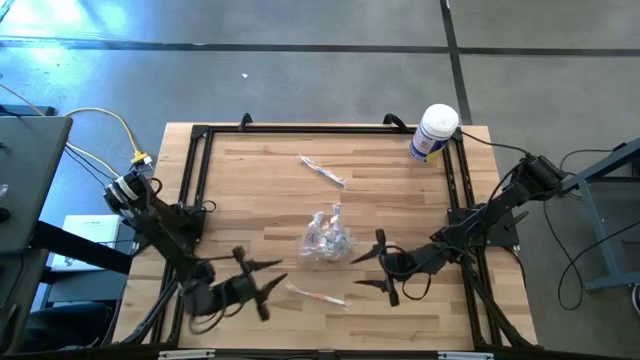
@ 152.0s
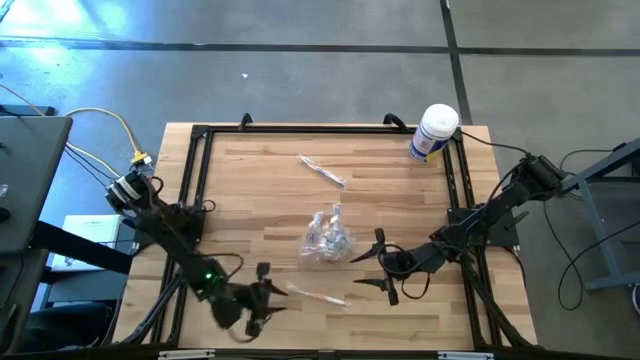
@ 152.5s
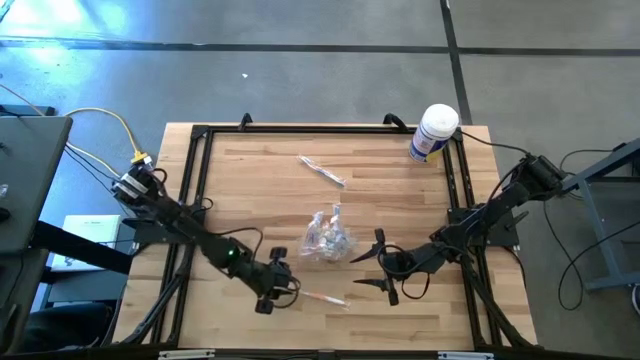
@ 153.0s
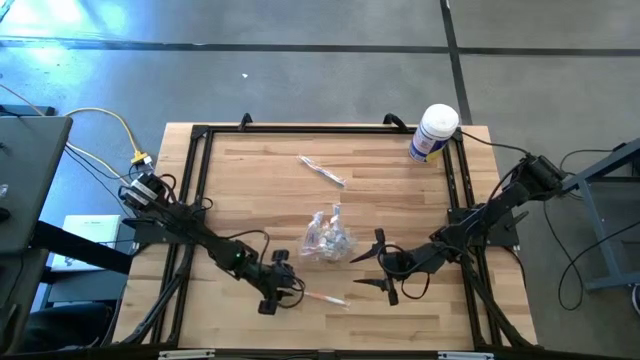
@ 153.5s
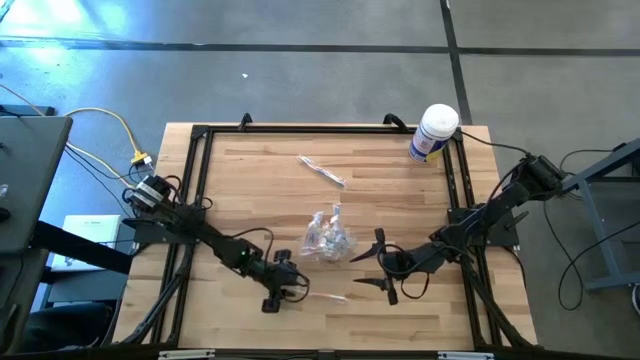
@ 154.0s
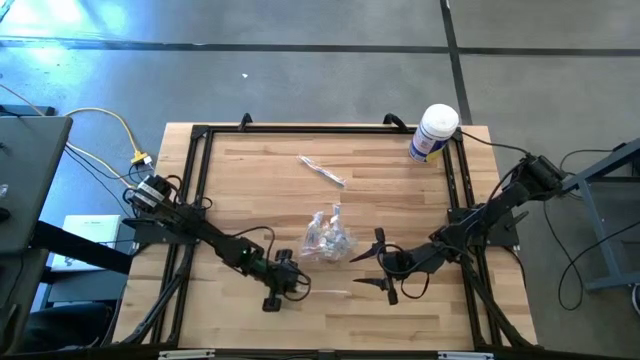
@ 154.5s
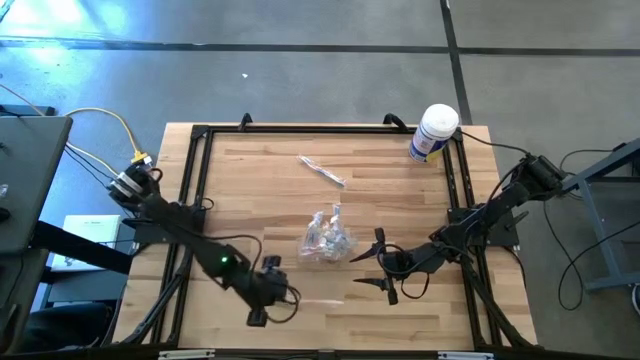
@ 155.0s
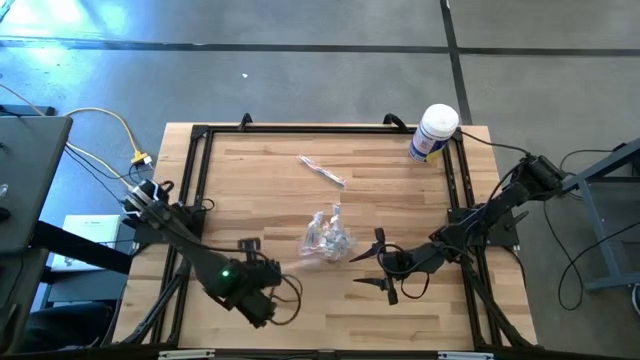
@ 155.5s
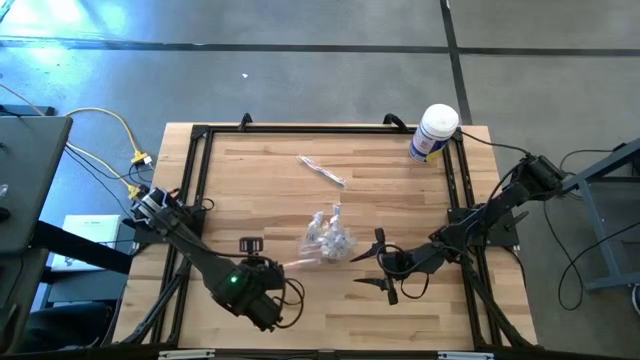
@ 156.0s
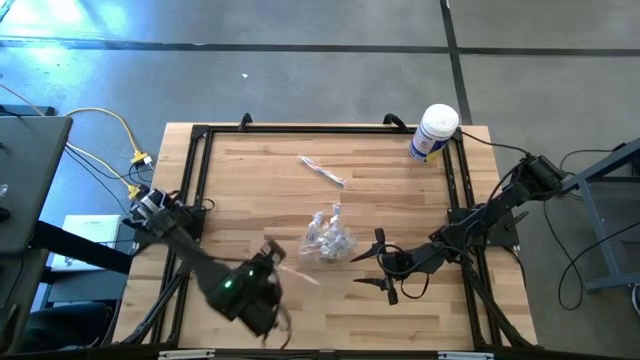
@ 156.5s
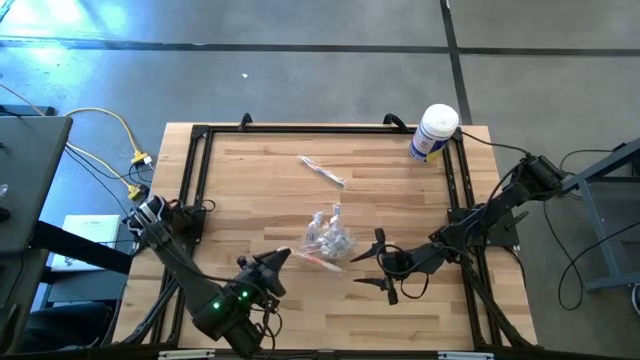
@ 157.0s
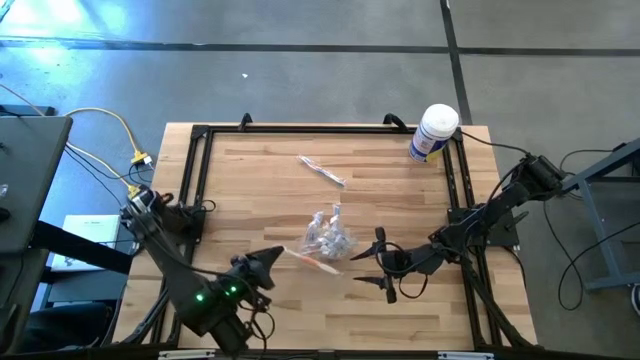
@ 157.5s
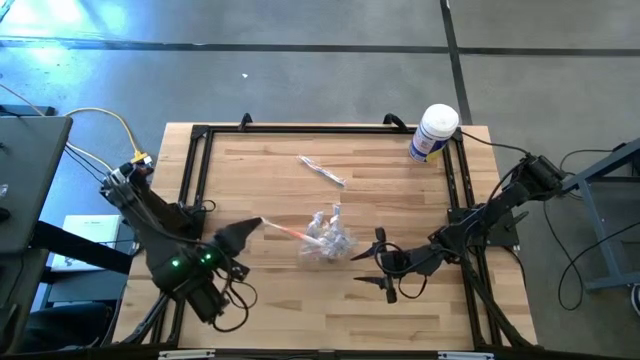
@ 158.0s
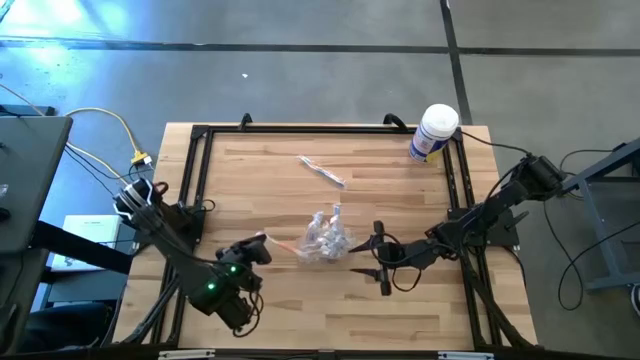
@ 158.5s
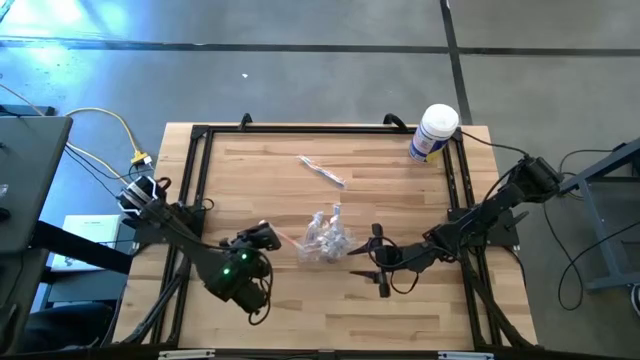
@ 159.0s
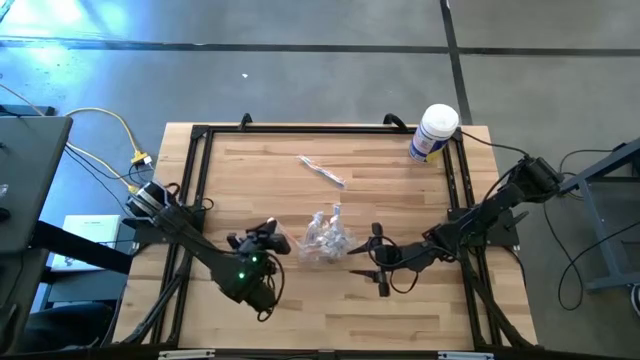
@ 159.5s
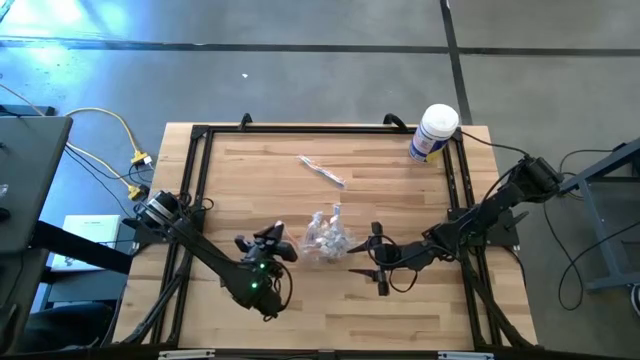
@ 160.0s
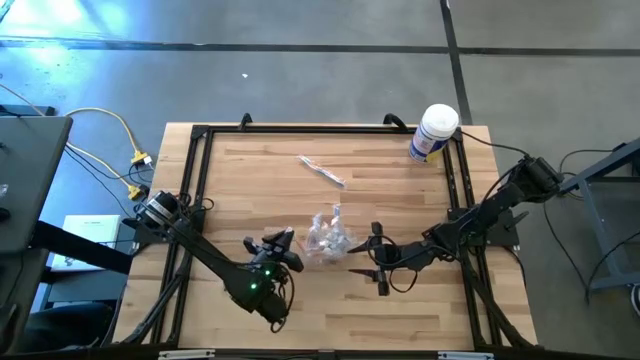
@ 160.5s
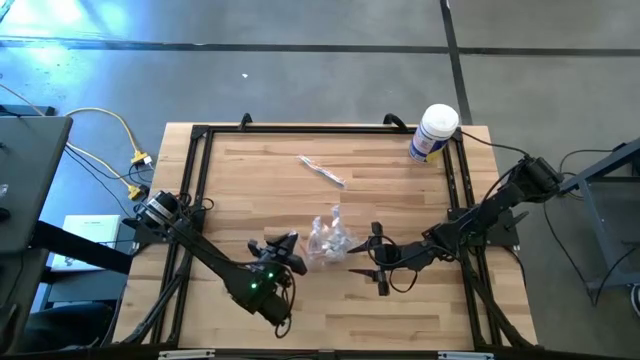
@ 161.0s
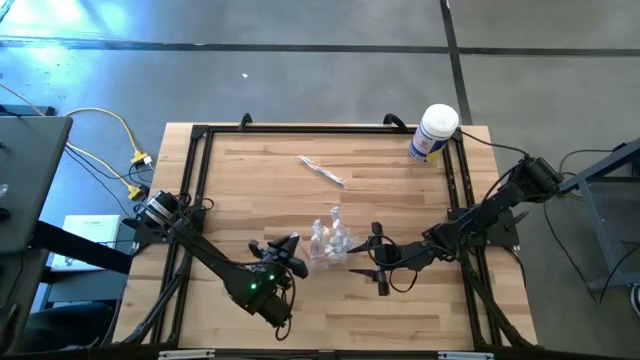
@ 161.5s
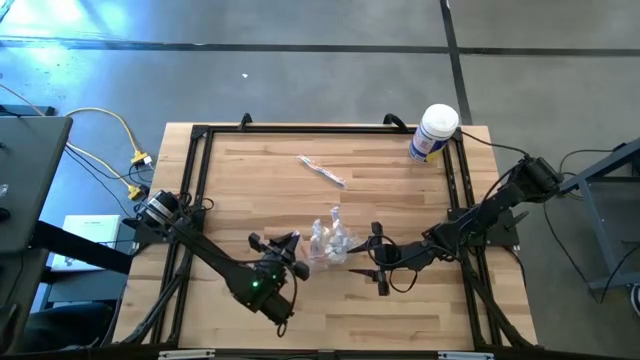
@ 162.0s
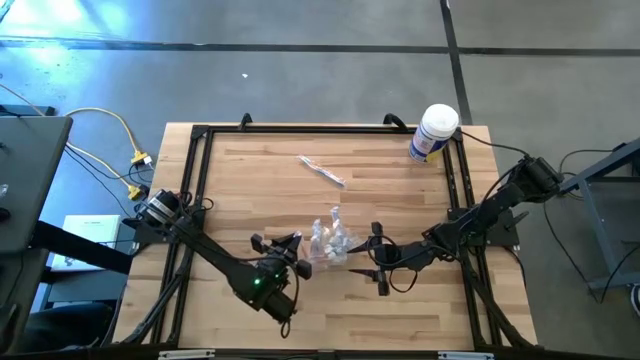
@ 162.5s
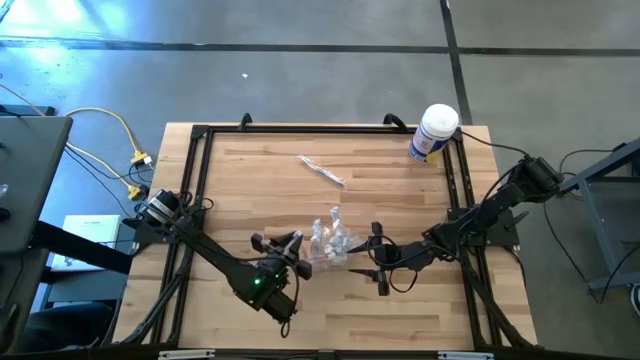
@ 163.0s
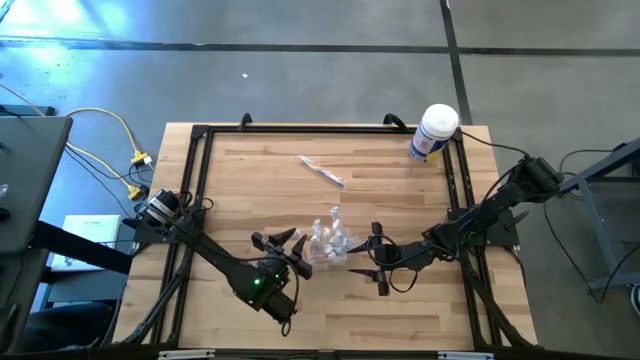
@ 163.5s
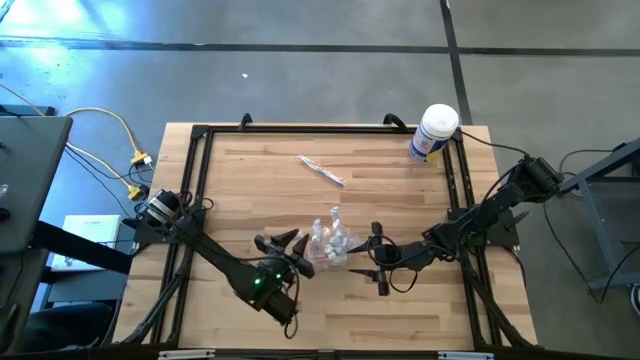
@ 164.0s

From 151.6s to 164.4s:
Task: Pick & Place toothbrushing station
Put the orange toothbrush into the transparent organizer

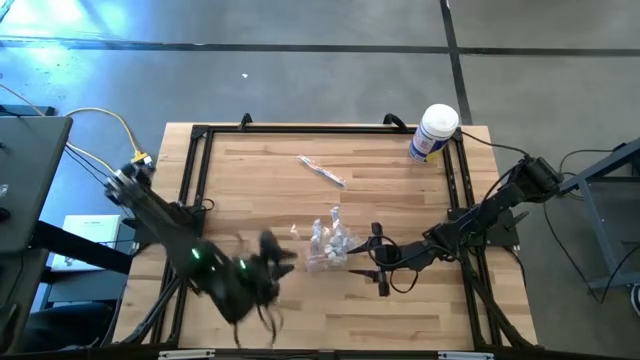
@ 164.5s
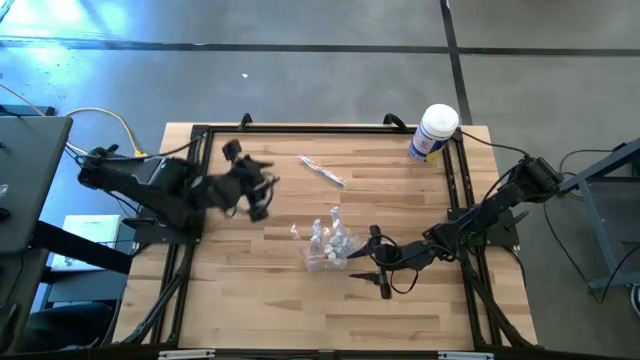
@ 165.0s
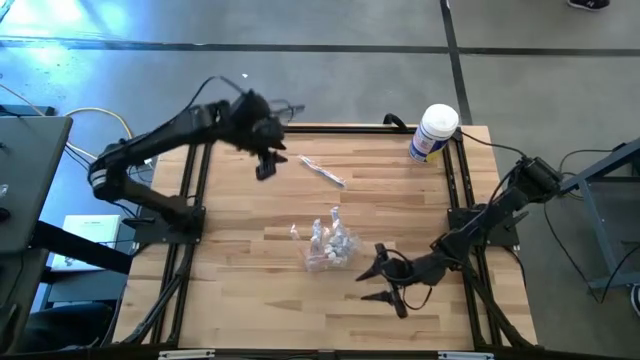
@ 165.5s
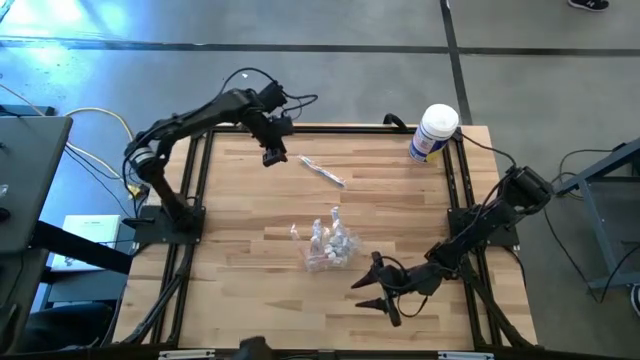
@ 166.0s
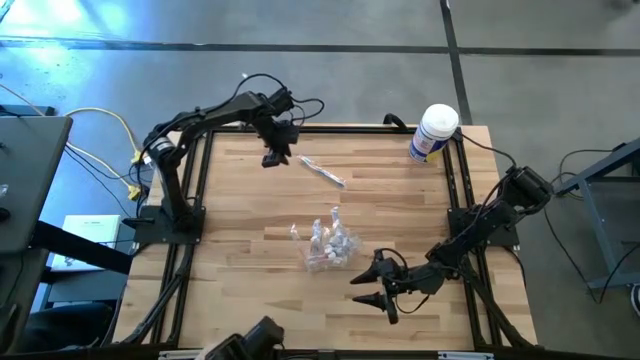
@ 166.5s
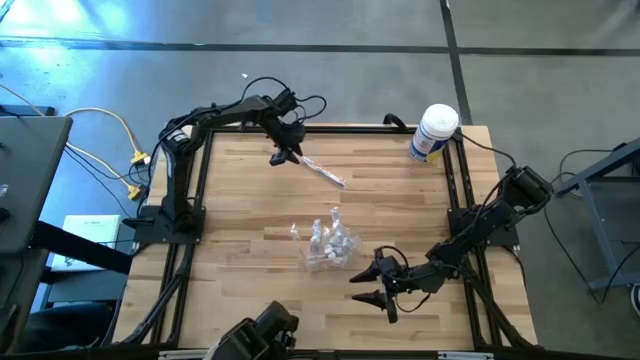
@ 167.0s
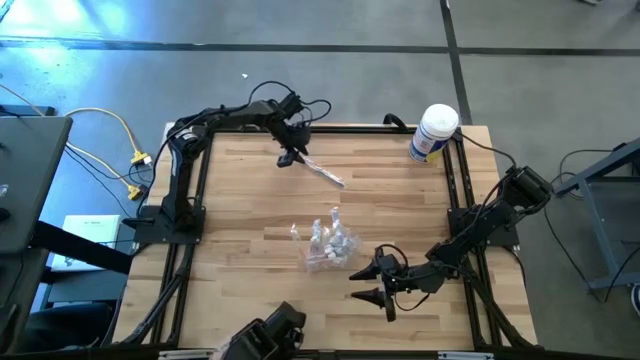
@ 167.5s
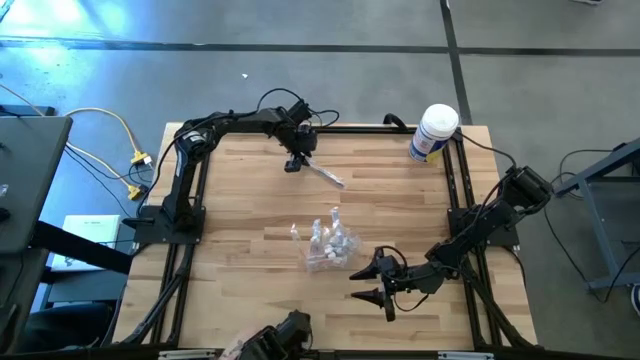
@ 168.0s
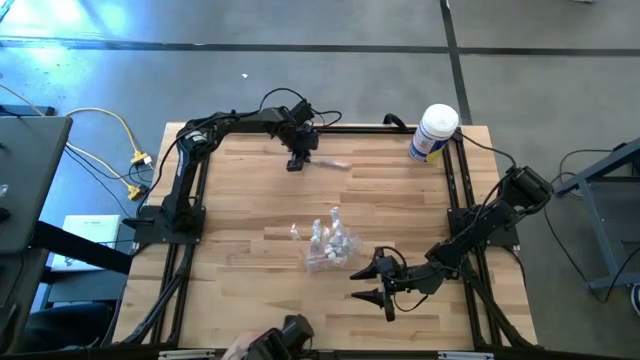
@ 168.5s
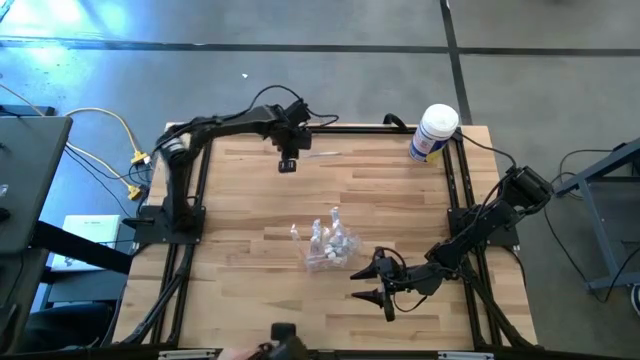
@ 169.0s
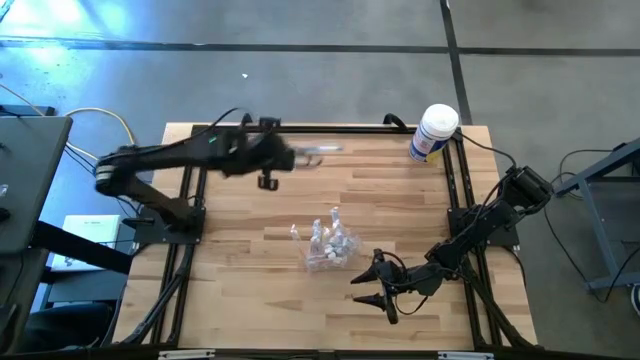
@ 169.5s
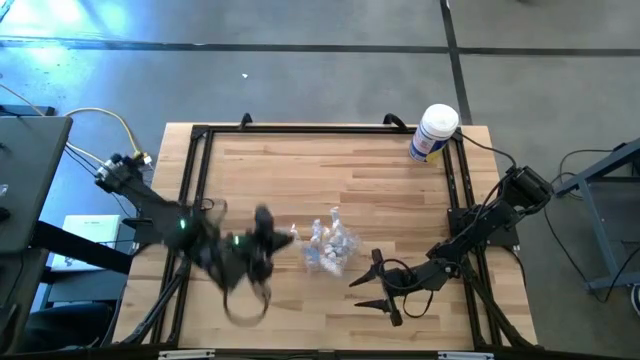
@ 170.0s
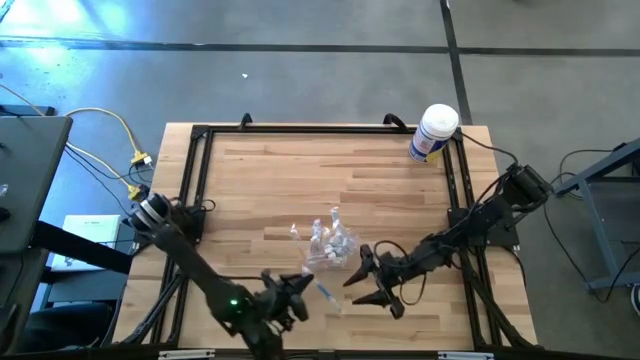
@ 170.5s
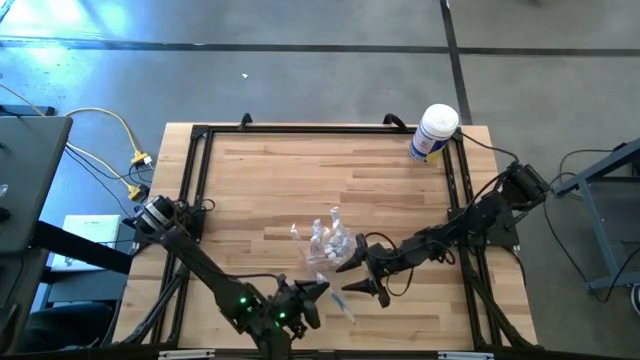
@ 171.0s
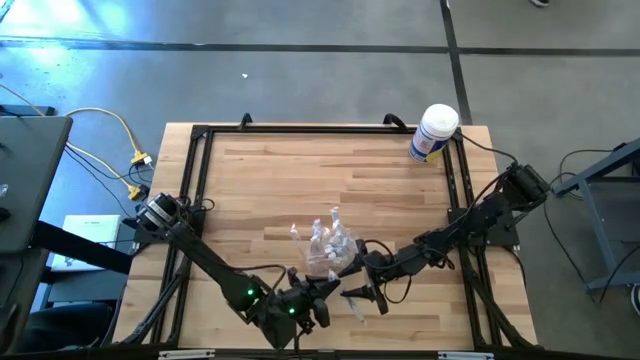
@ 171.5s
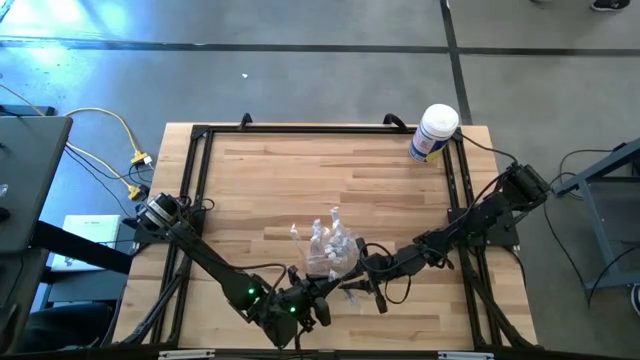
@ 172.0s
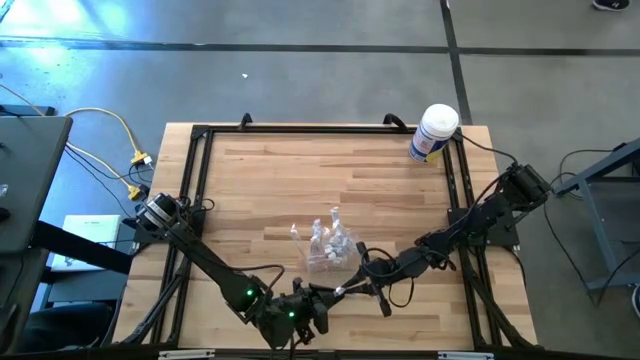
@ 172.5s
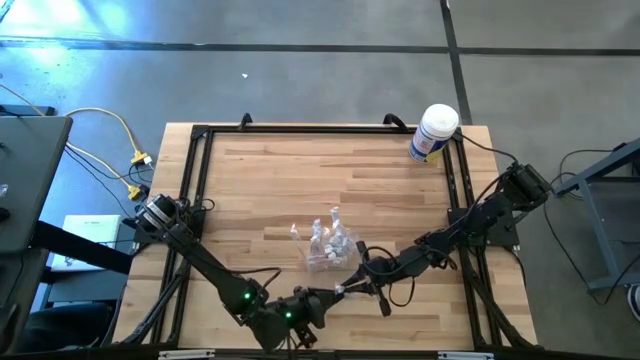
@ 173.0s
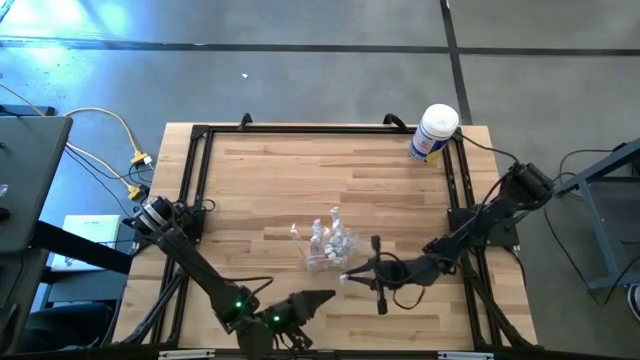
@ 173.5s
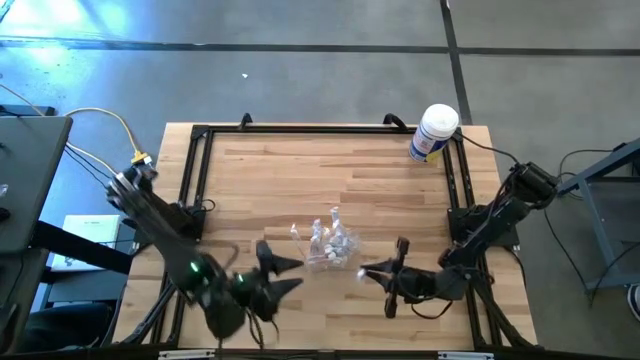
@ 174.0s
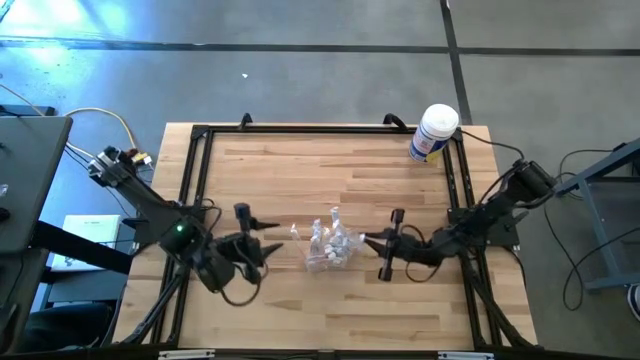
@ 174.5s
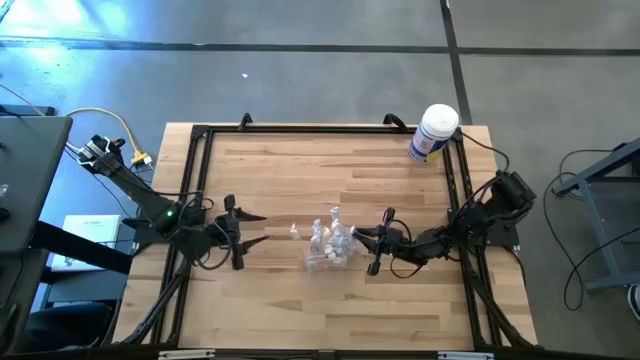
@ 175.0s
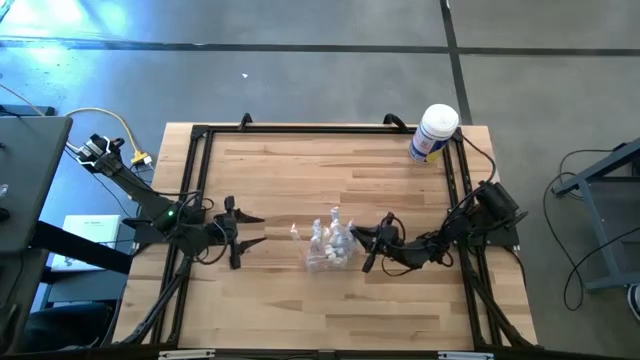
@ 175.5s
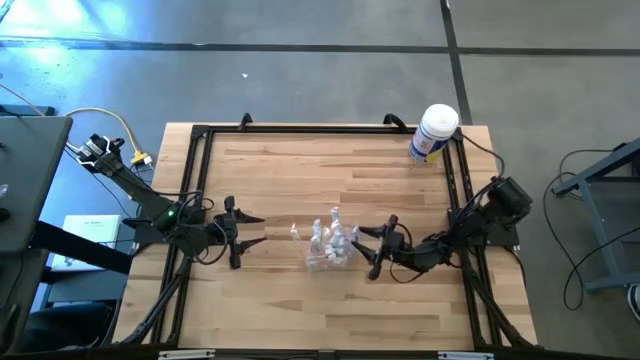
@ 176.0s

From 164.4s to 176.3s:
Put the blue toothbrush into the transparent organizer
